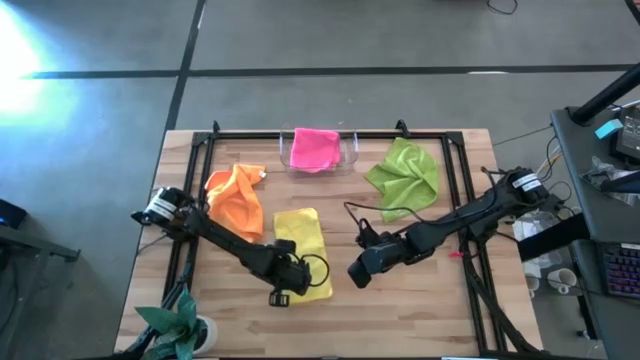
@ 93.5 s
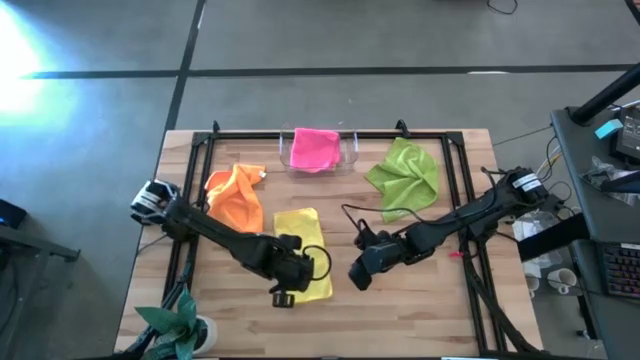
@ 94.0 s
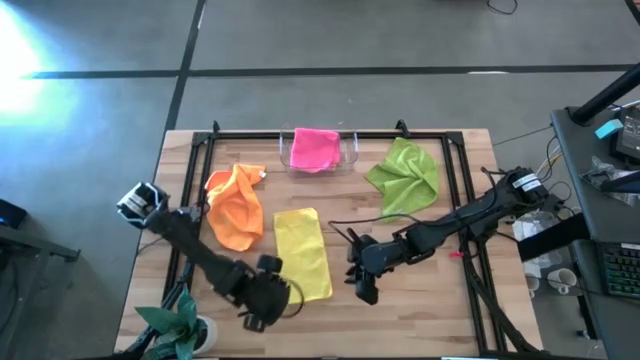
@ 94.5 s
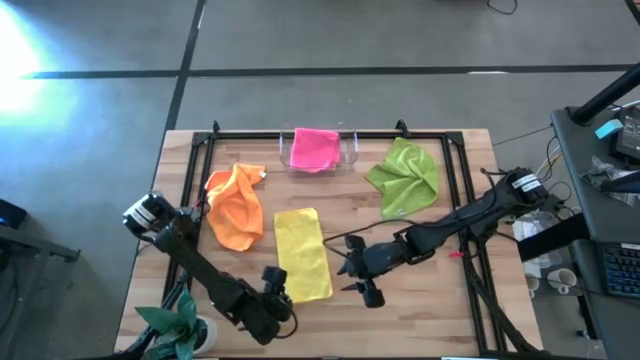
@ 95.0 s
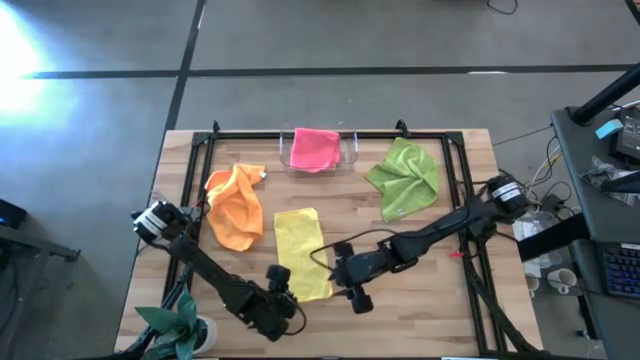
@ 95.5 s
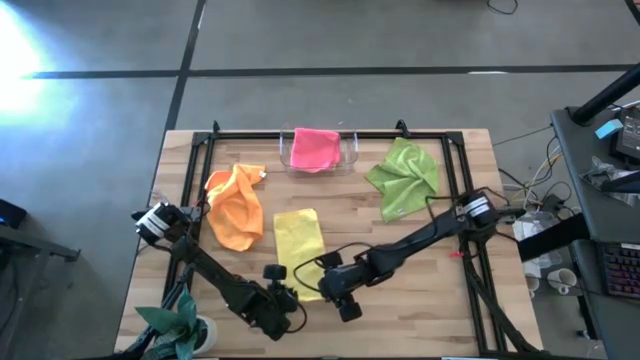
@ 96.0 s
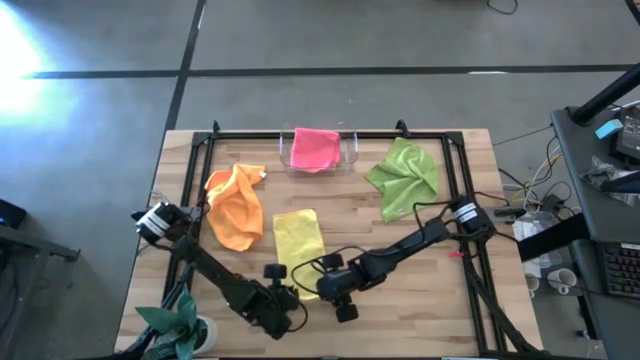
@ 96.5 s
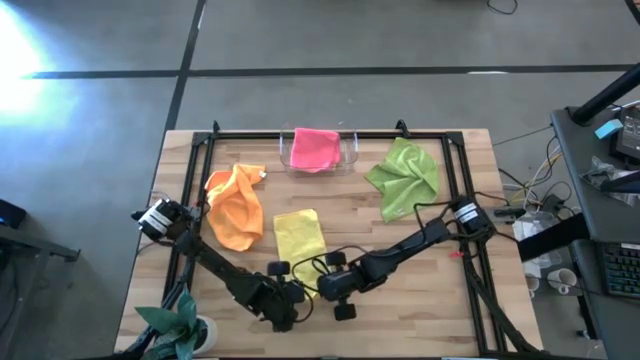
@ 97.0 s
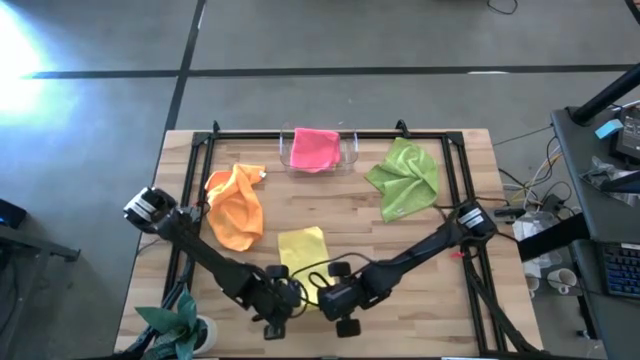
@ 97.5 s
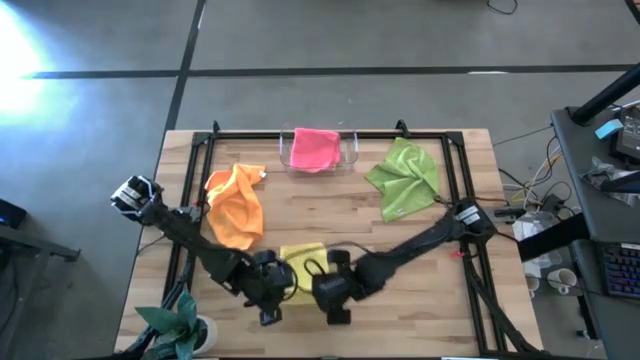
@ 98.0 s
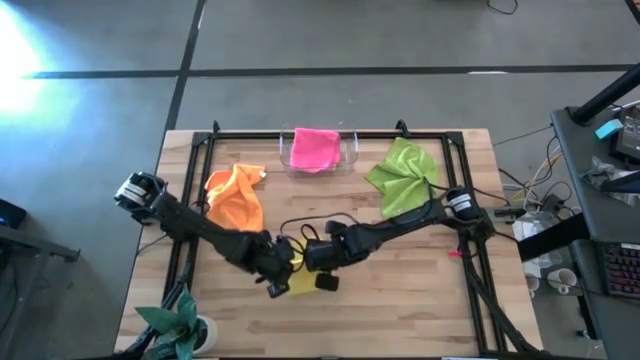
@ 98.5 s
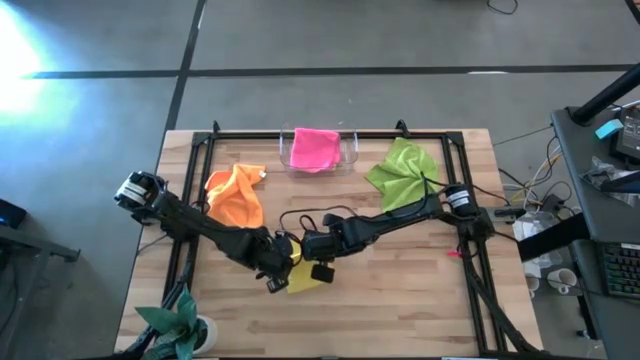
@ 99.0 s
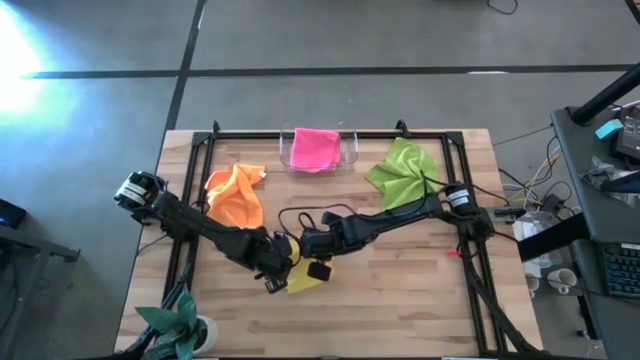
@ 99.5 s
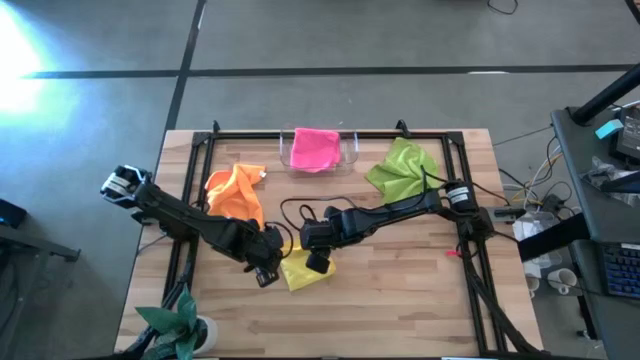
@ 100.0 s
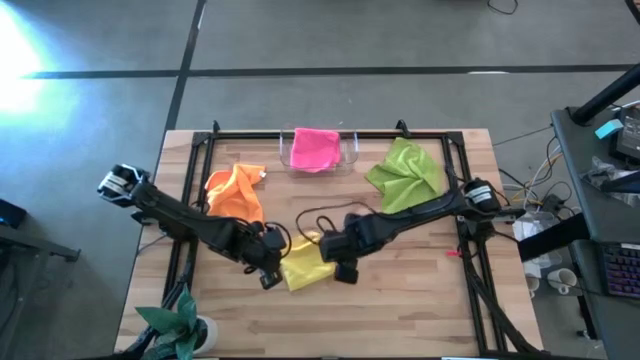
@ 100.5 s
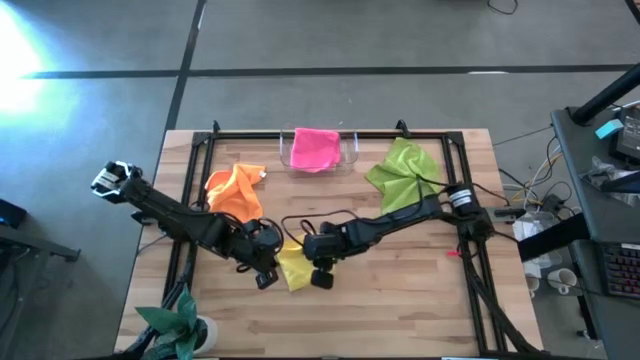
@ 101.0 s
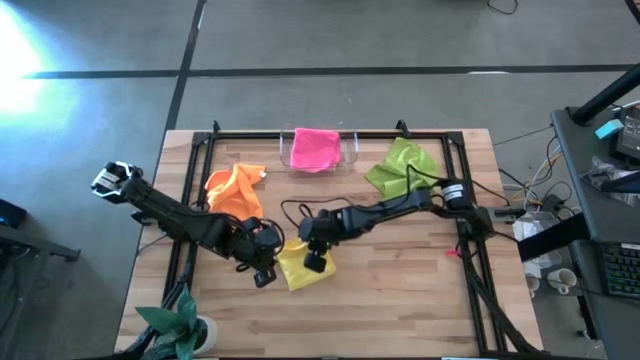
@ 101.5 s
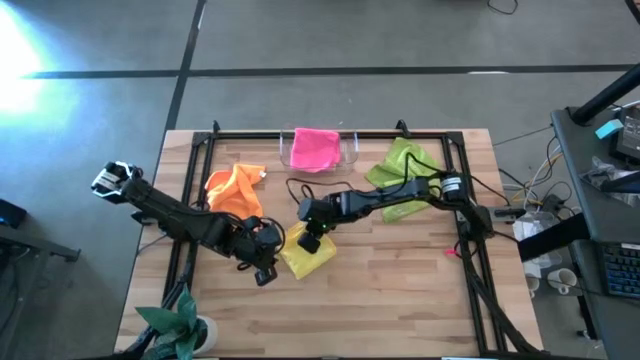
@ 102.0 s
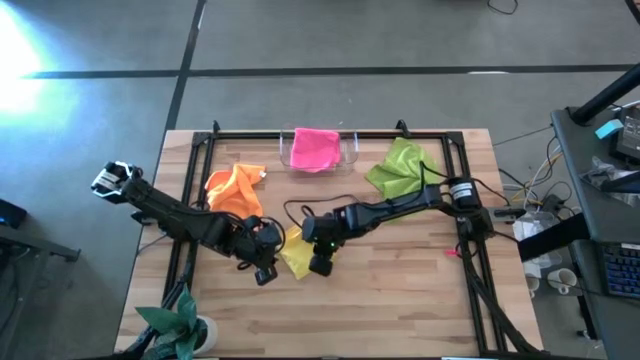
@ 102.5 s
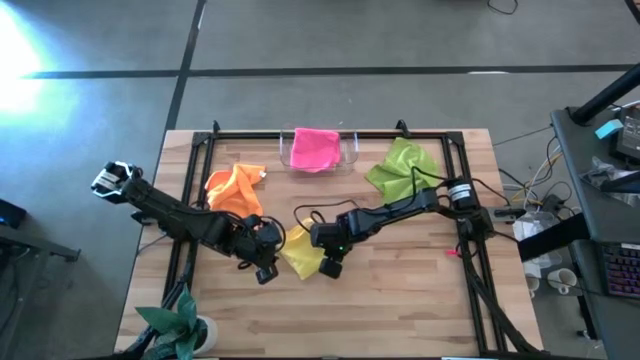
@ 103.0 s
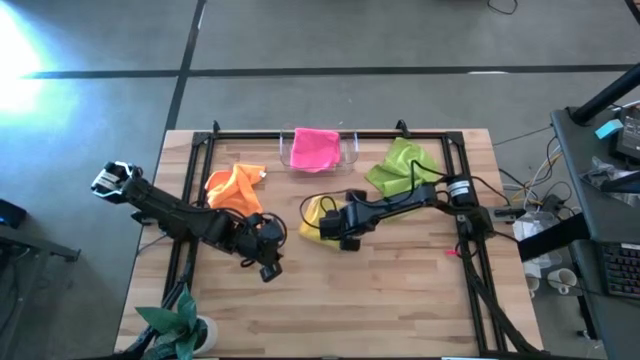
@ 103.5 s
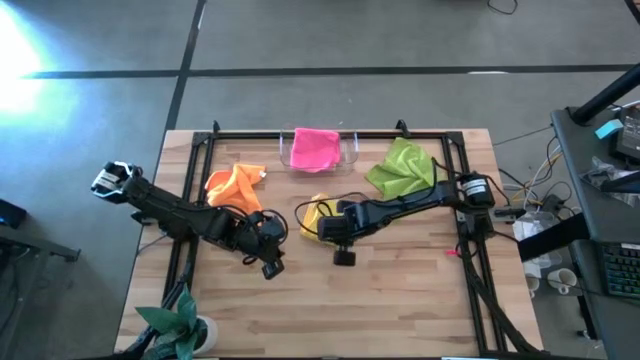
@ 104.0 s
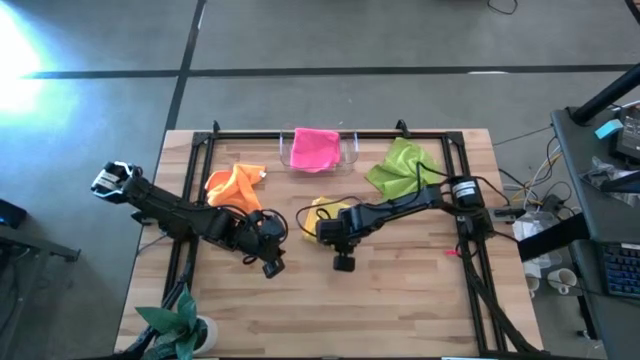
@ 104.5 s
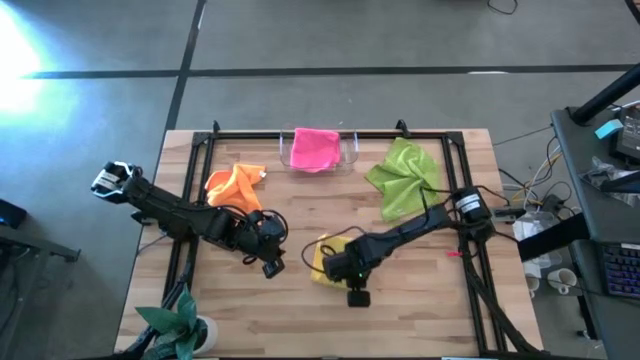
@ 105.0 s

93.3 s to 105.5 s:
Task: Fold microfiber towels
Fold the yellow microfiber cloth

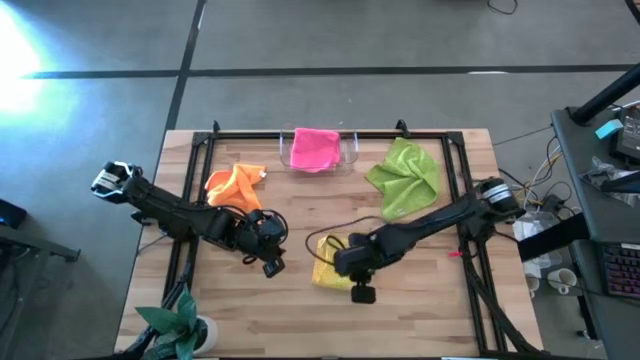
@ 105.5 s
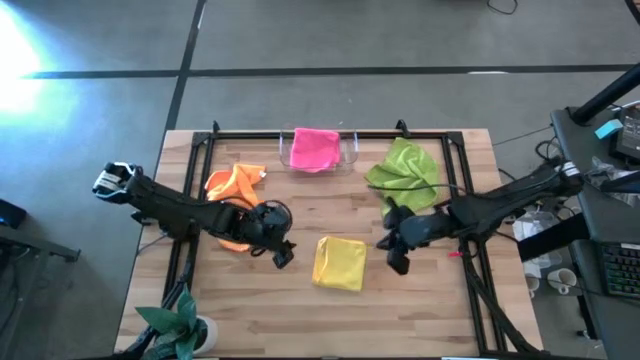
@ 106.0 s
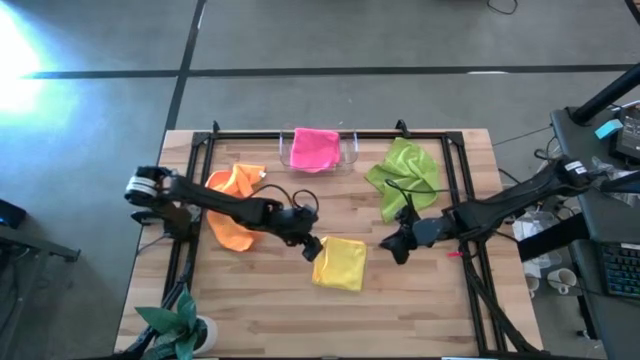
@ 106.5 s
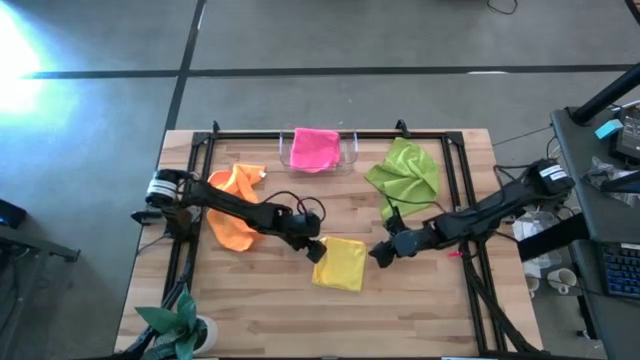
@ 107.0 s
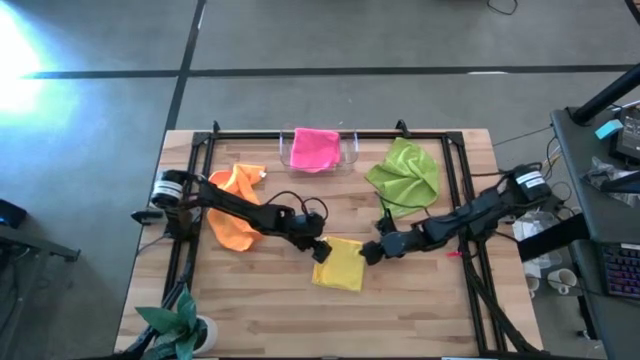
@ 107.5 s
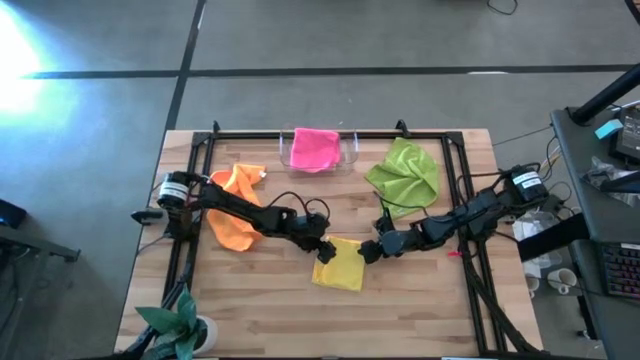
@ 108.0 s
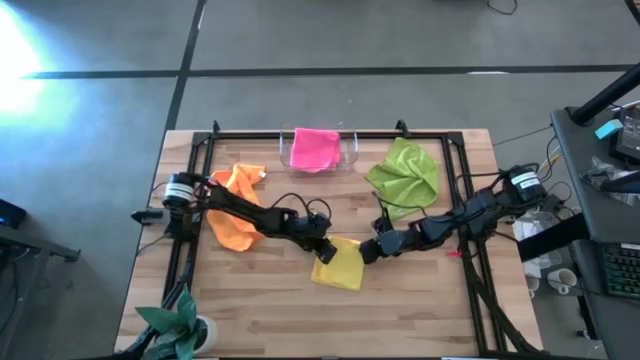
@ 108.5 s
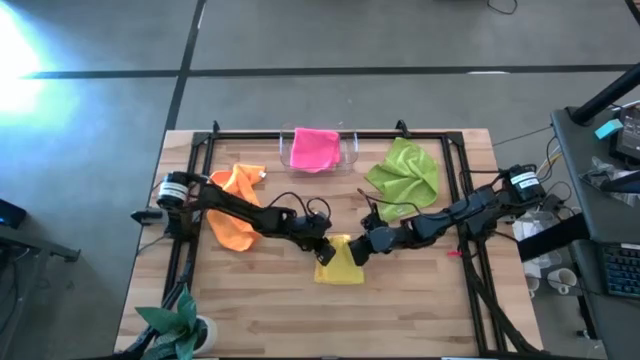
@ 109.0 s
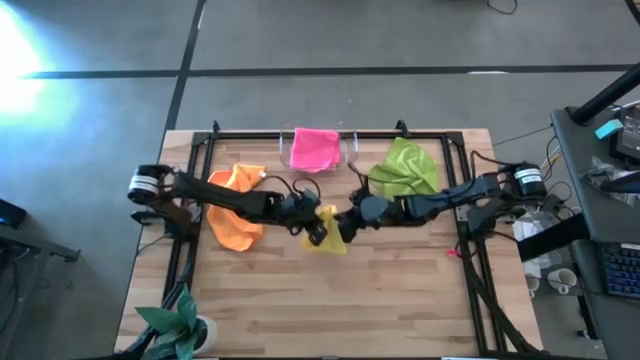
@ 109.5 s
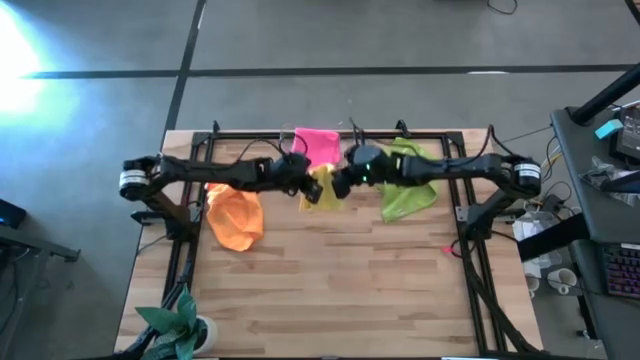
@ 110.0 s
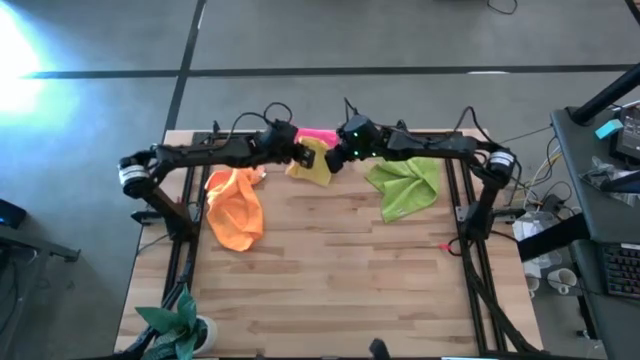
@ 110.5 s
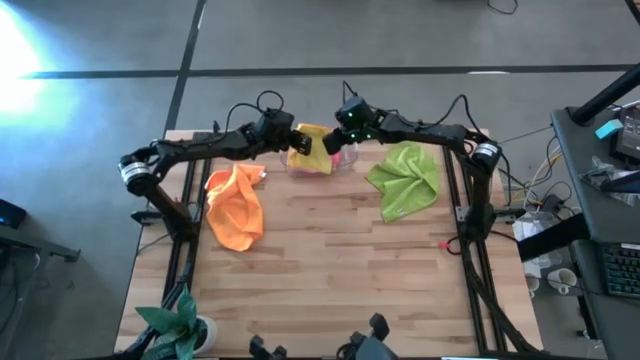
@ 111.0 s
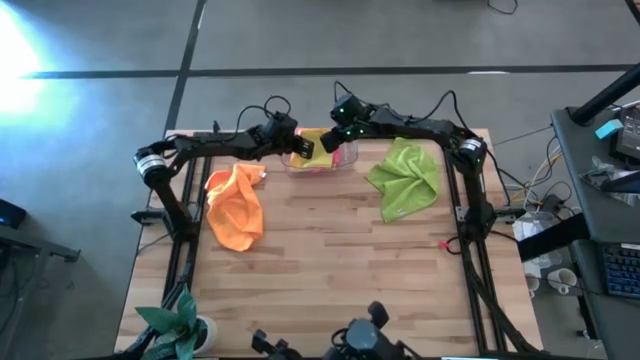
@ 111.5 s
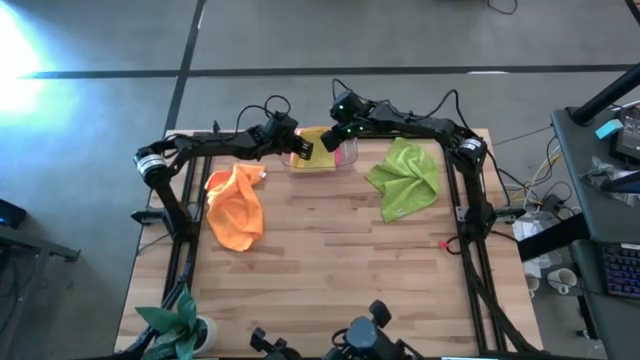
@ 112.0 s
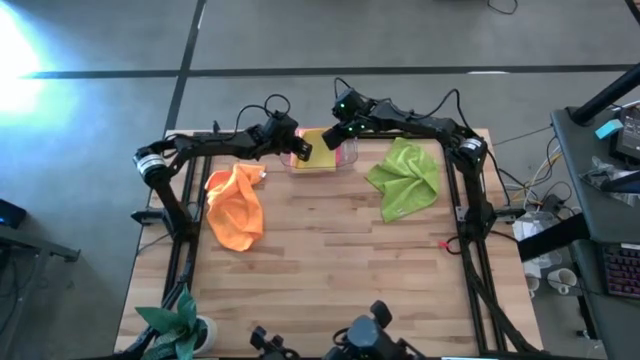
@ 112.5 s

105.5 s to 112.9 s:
Put the folded yellow microfiber cloth into the transparent bin
